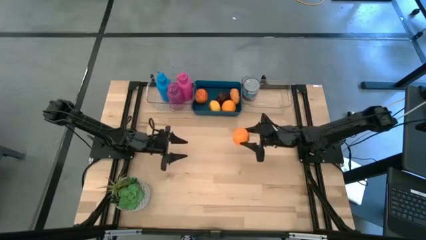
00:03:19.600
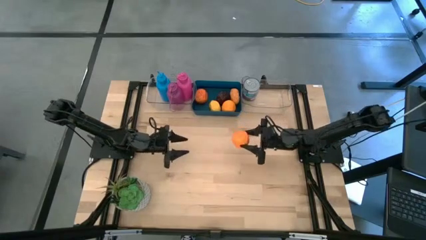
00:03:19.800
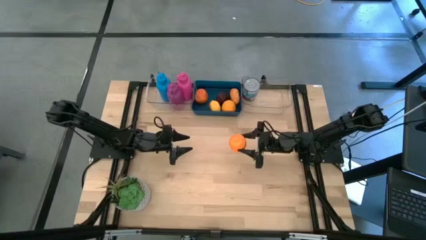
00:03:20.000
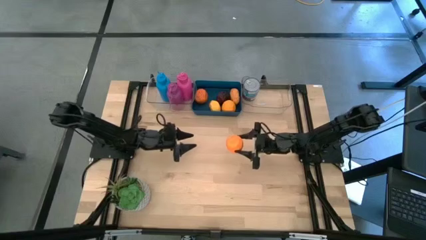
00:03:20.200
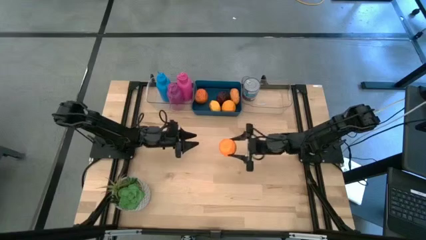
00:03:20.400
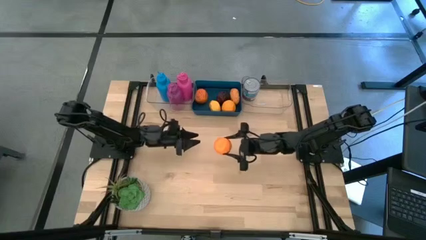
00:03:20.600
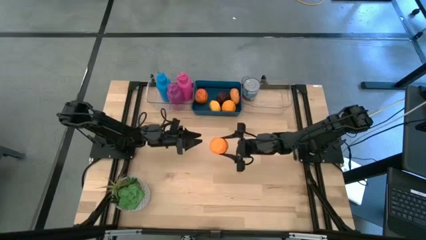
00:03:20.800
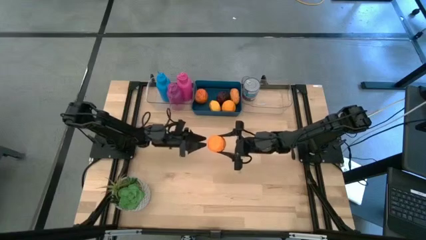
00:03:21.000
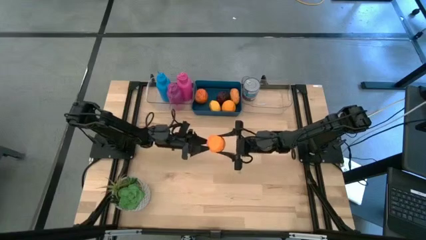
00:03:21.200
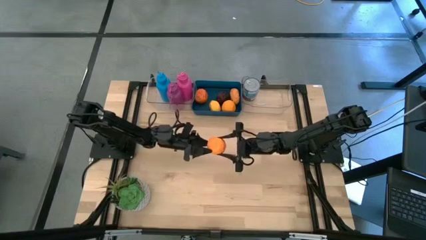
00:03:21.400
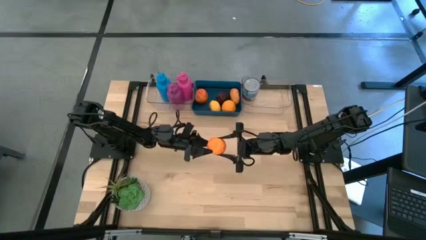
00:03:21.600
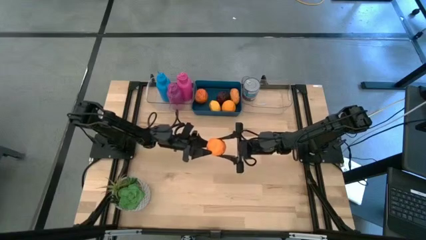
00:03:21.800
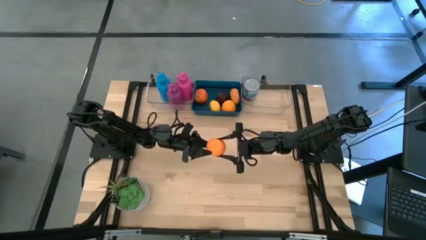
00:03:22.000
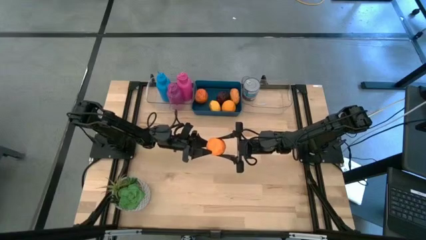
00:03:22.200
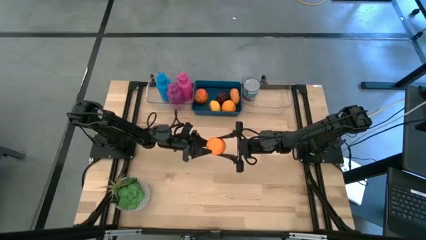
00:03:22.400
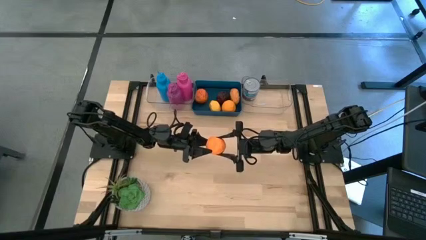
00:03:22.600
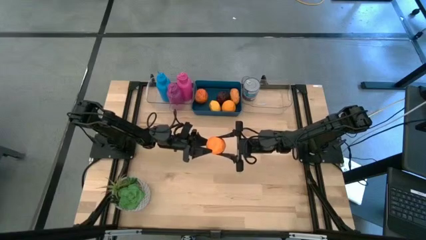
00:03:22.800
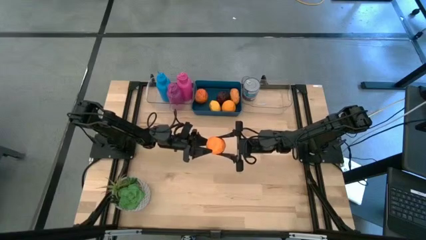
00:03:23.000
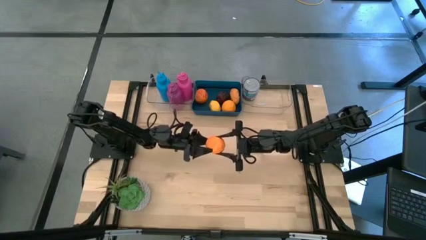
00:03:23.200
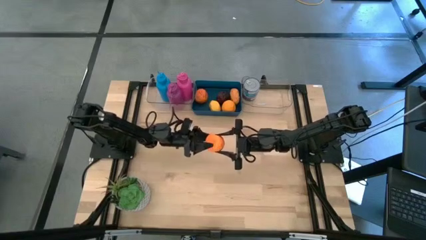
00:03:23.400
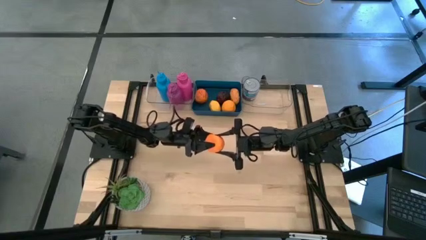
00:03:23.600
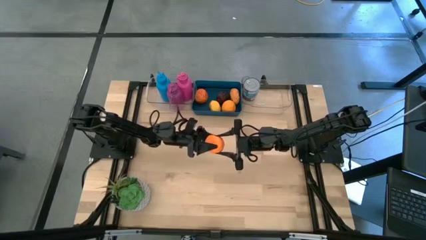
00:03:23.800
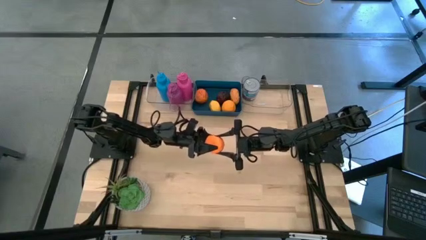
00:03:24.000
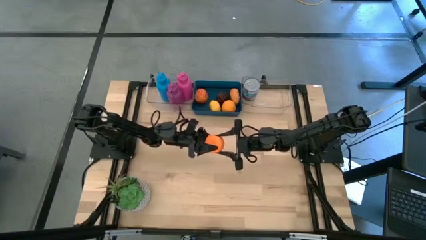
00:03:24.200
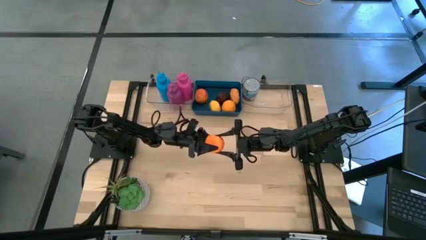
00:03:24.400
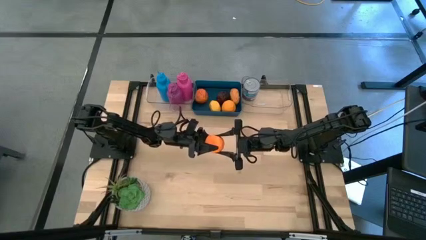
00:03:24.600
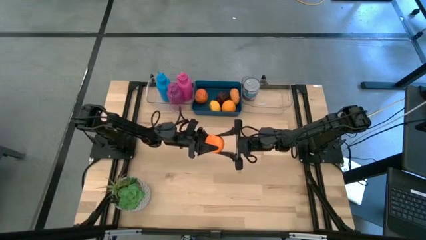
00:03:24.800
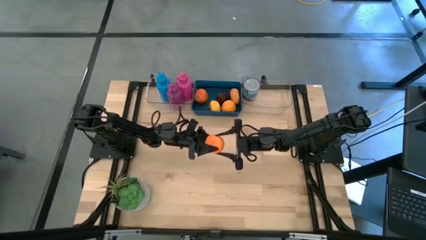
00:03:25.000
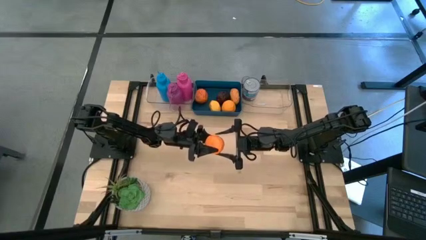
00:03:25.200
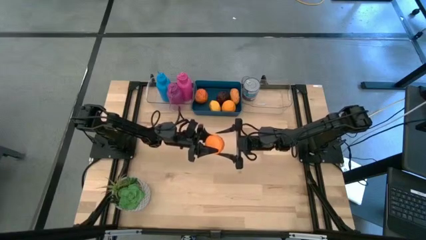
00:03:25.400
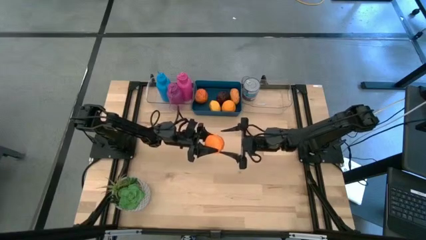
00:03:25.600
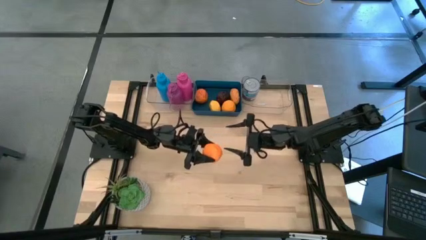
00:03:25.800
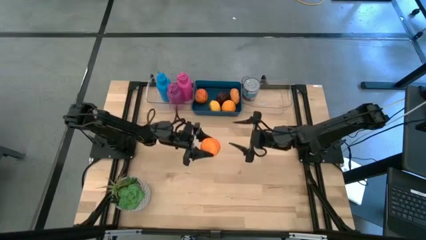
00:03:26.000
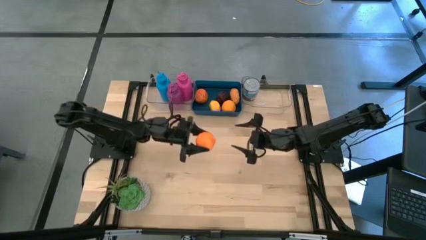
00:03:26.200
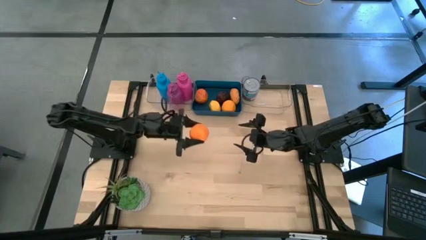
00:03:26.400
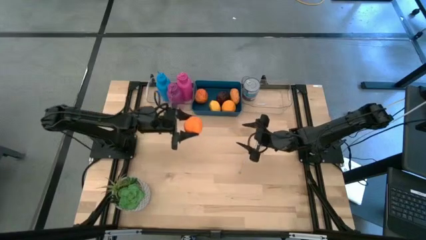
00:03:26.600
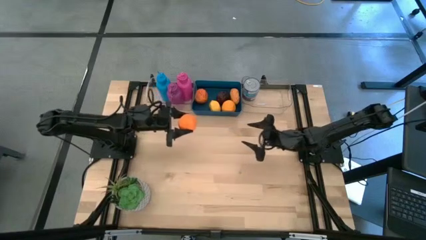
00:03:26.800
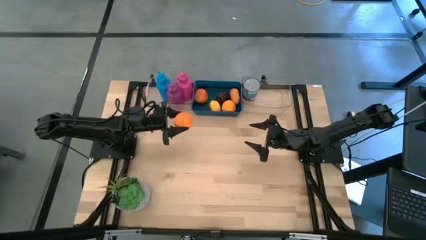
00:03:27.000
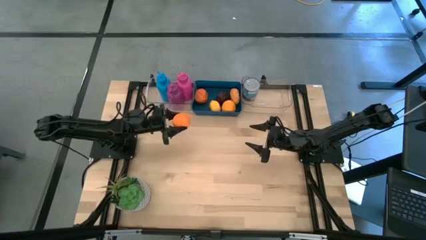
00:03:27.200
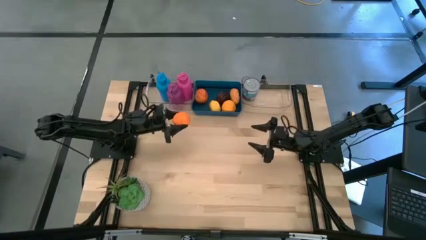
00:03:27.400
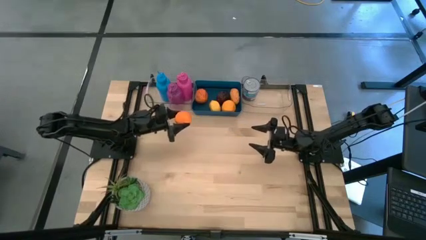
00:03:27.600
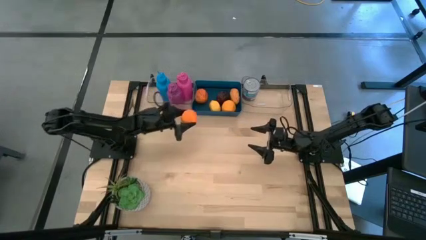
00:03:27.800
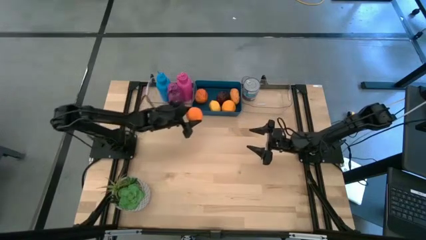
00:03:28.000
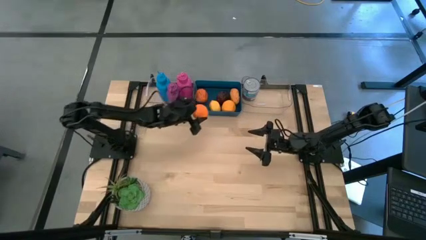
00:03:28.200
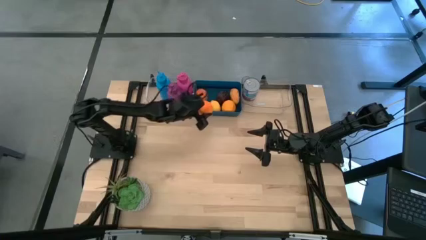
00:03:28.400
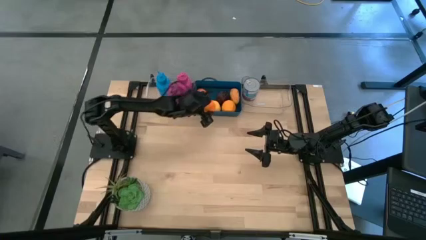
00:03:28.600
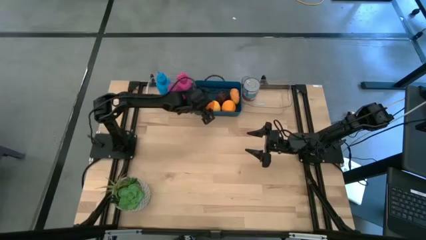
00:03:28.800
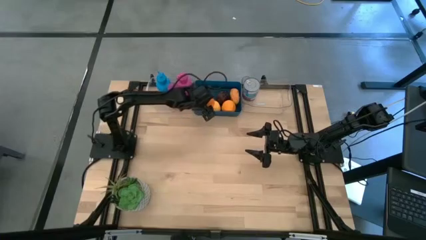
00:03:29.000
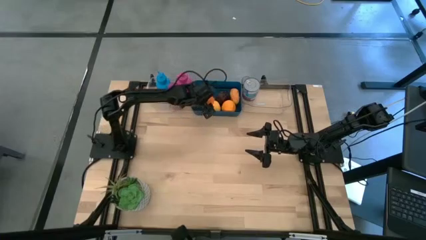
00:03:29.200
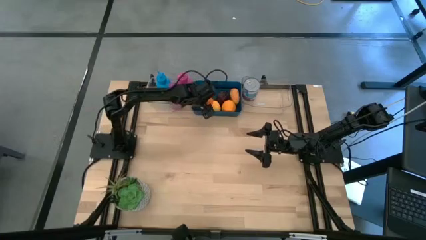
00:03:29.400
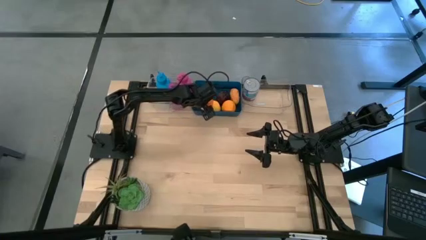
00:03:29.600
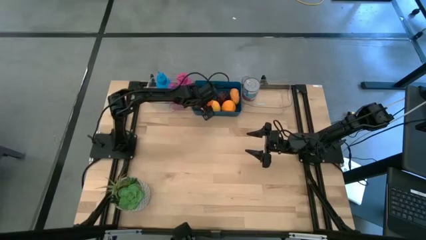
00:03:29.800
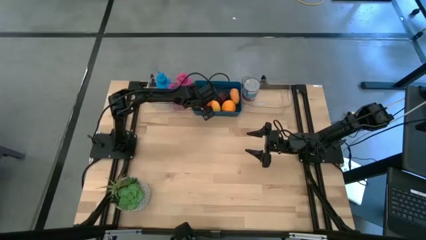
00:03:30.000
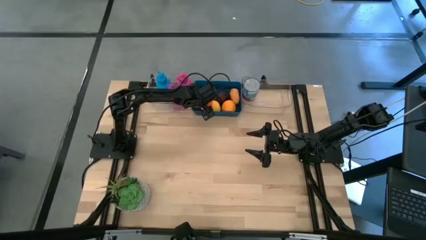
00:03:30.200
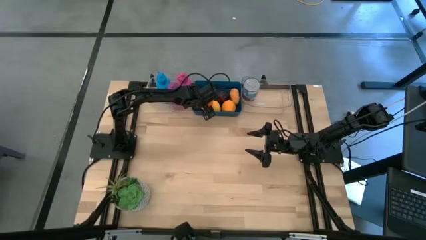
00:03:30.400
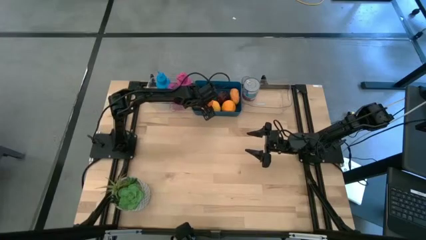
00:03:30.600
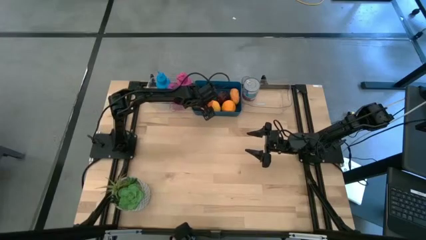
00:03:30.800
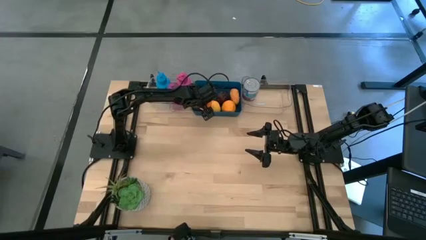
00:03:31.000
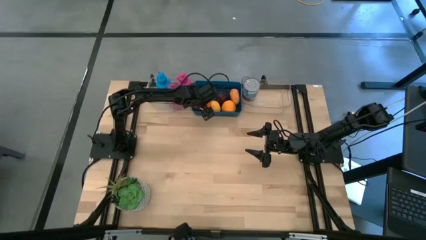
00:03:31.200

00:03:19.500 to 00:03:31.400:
Task: Pick & Place Food Item
Put the orange into the blue bin

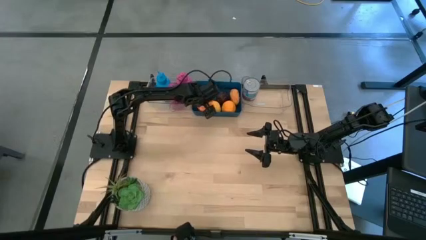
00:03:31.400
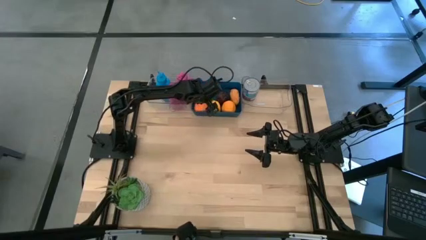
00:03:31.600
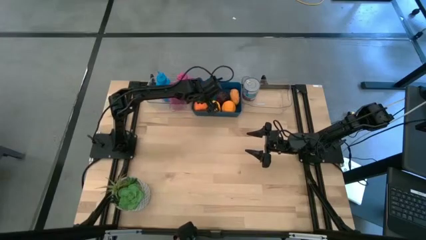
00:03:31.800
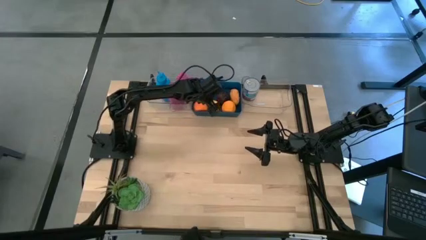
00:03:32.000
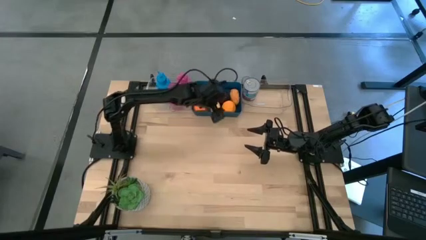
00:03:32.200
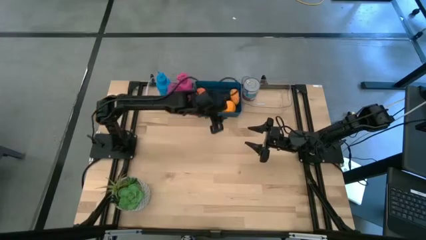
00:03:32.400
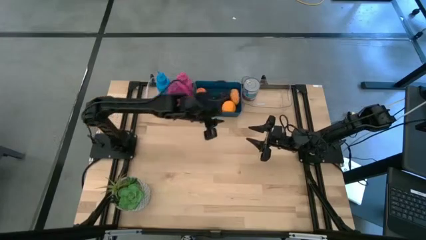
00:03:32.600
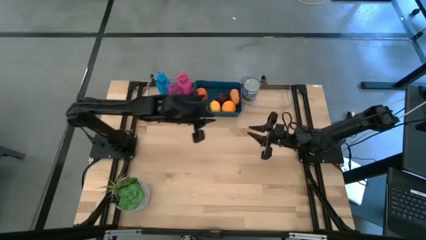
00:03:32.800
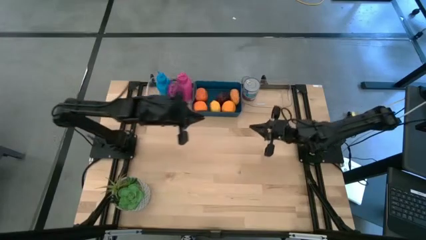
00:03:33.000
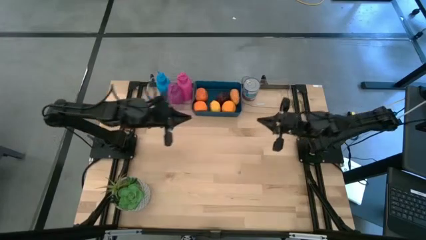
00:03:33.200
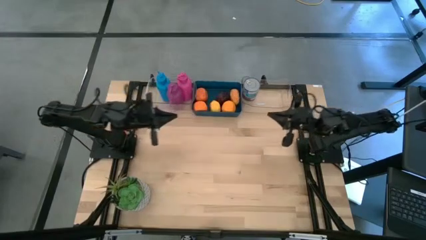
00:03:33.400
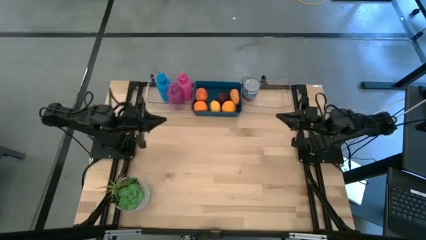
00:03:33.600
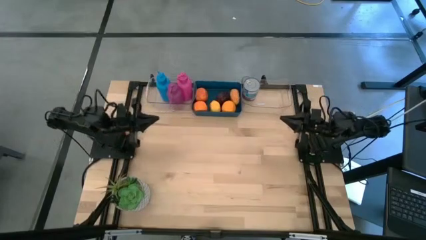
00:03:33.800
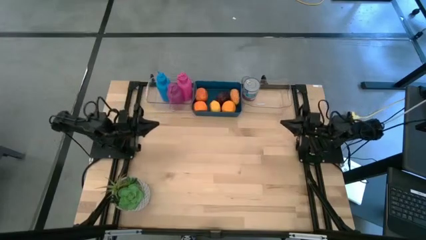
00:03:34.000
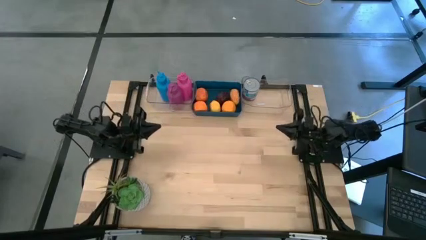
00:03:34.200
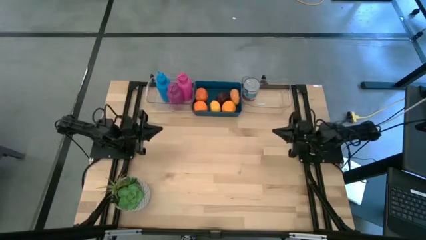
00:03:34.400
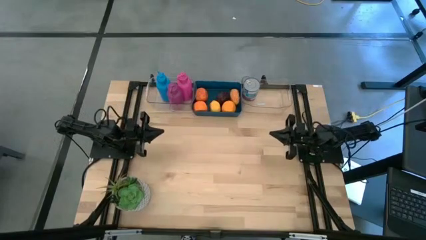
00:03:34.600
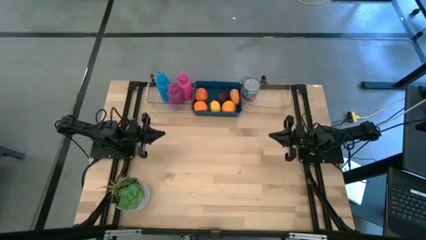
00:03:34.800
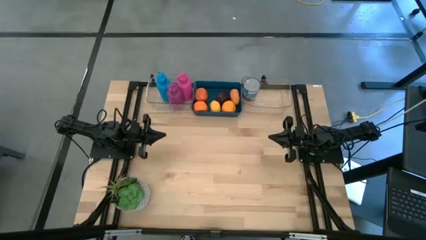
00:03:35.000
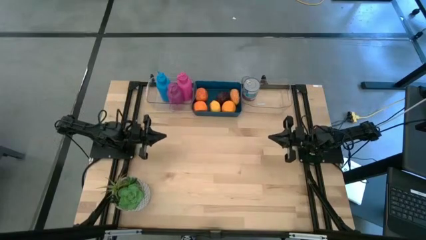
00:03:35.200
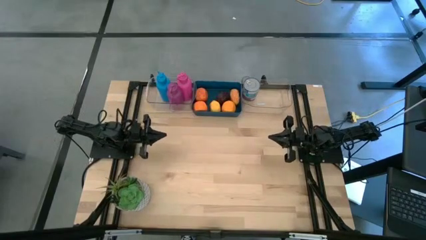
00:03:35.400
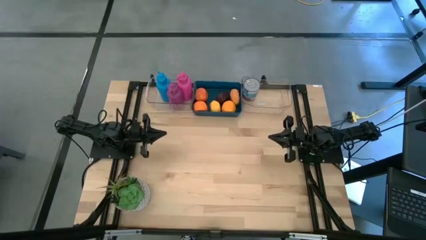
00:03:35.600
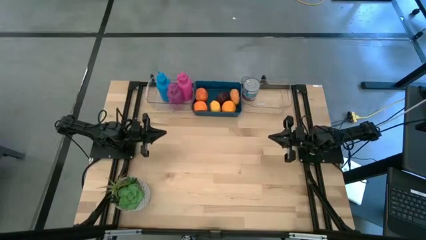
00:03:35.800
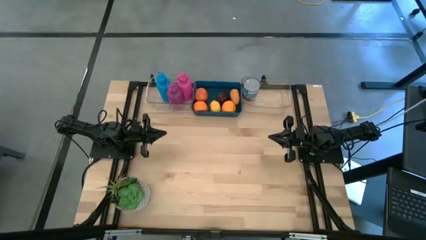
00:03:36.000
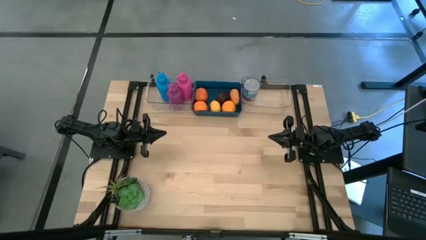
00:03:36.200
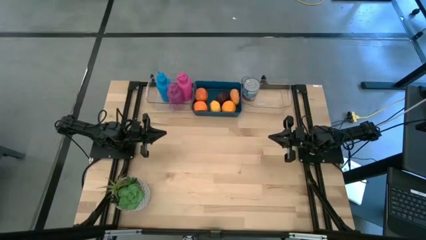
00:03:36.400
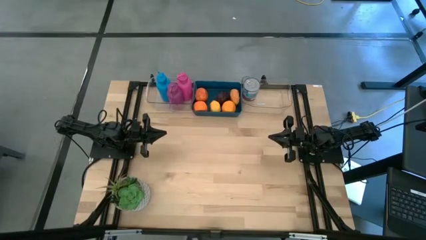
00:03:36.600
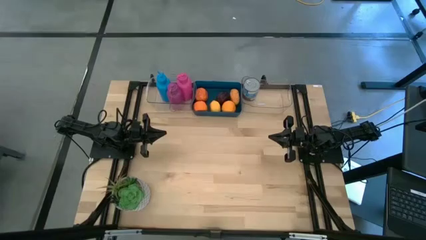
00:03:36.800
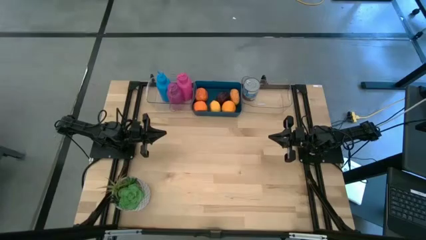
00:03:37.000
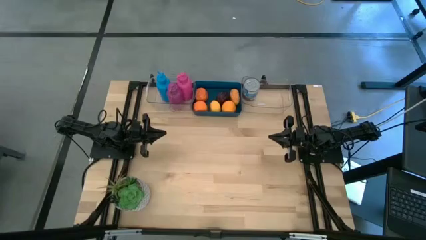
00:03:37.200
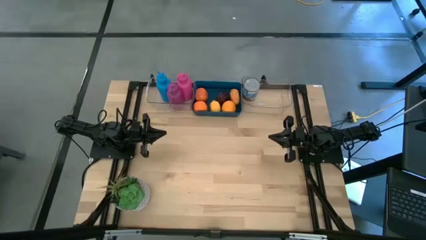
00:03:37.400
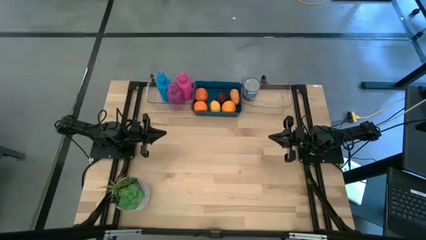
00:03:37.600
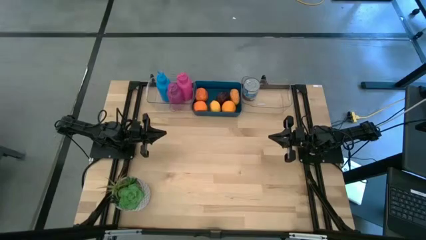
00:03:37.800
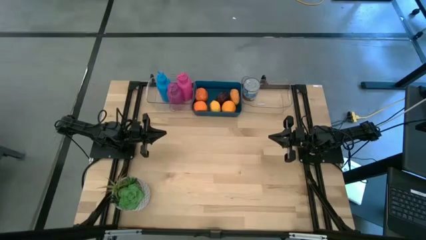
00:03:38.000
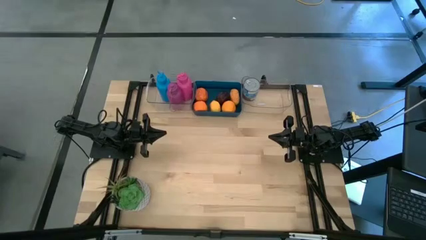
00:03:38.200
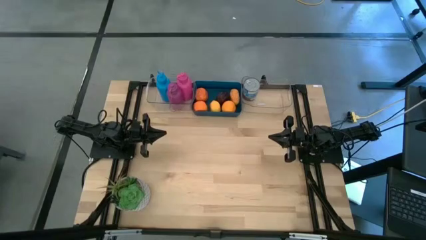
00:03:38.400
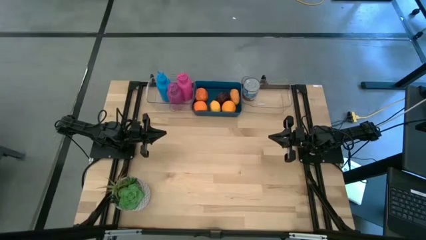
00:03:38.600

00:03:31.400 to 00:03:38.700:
Return to Home Position
